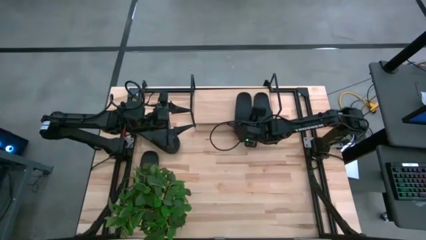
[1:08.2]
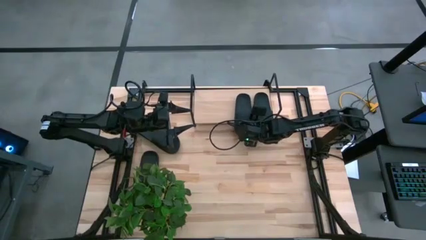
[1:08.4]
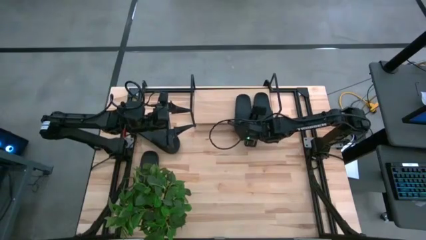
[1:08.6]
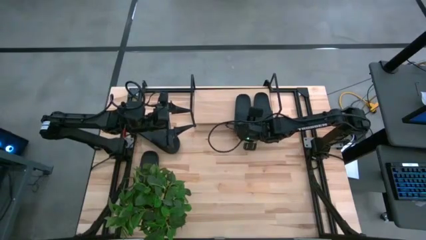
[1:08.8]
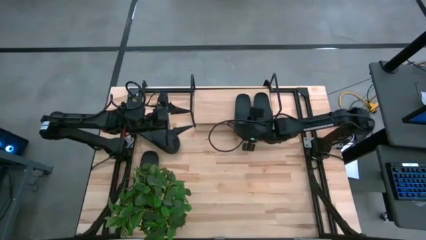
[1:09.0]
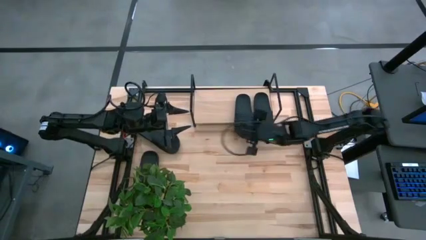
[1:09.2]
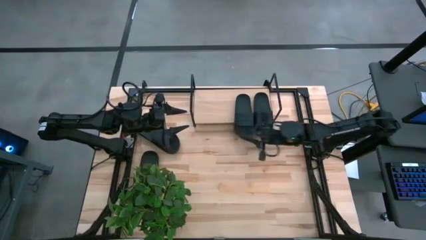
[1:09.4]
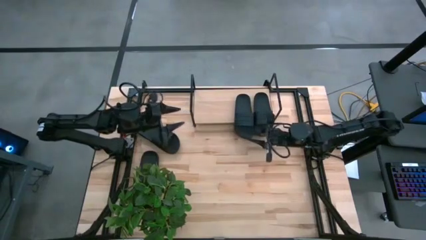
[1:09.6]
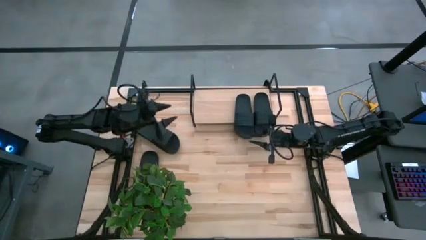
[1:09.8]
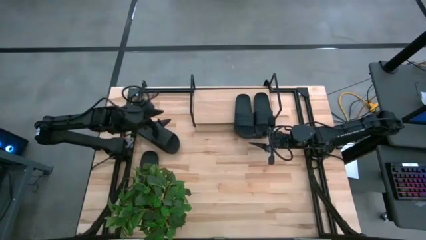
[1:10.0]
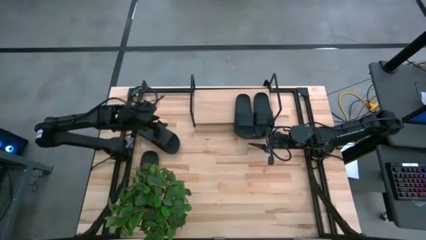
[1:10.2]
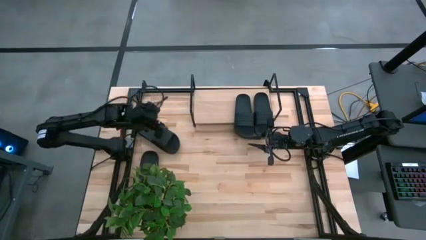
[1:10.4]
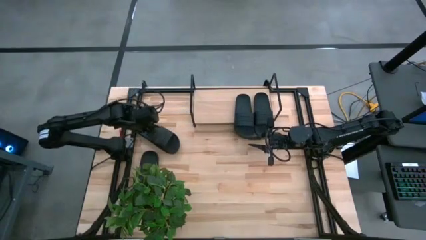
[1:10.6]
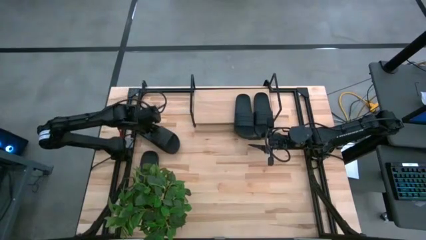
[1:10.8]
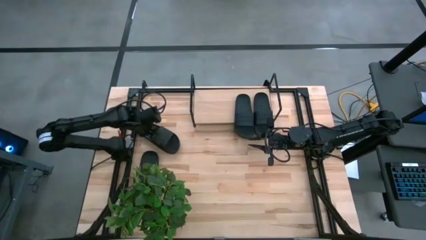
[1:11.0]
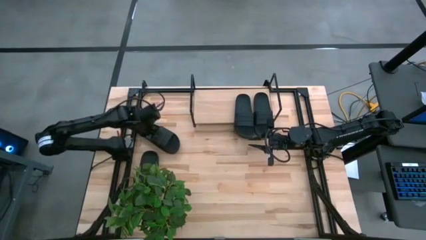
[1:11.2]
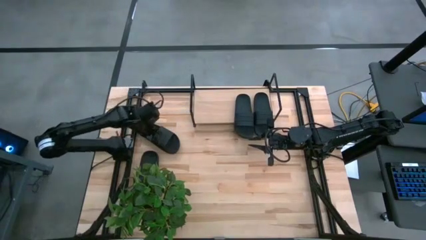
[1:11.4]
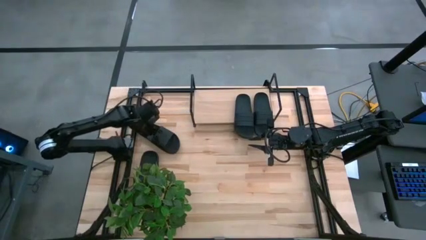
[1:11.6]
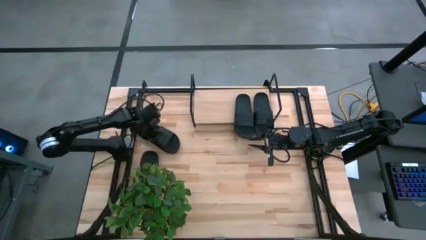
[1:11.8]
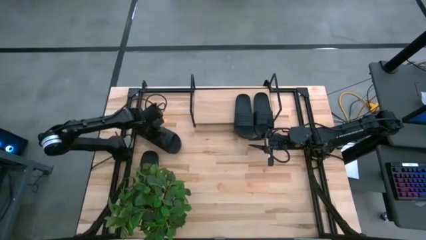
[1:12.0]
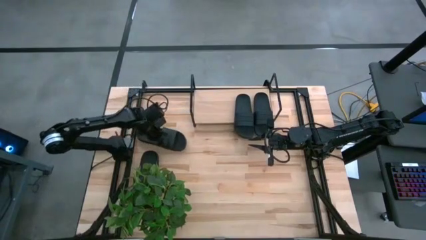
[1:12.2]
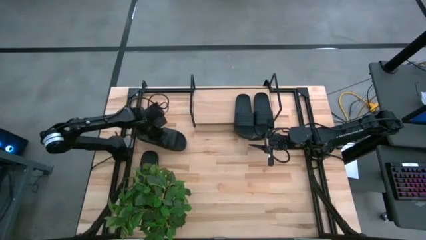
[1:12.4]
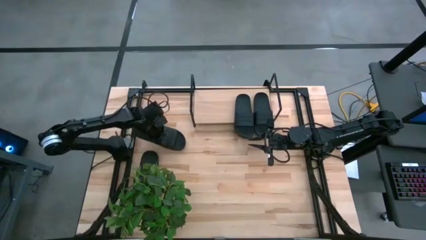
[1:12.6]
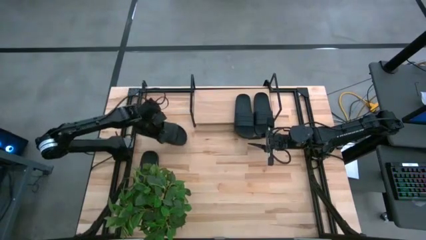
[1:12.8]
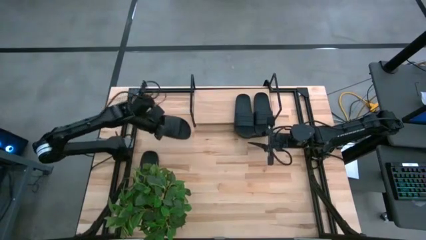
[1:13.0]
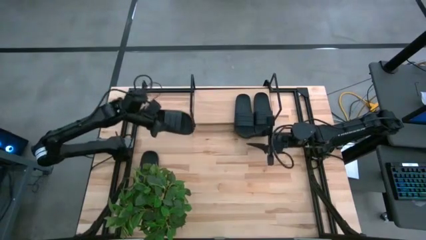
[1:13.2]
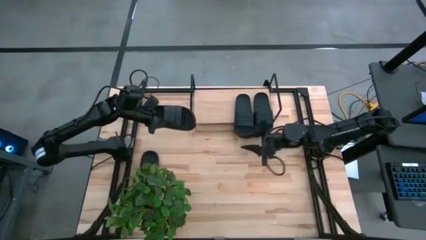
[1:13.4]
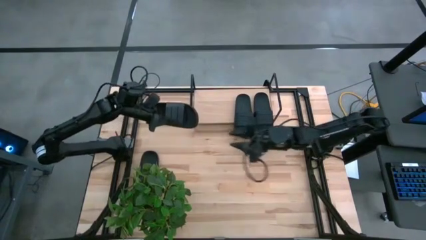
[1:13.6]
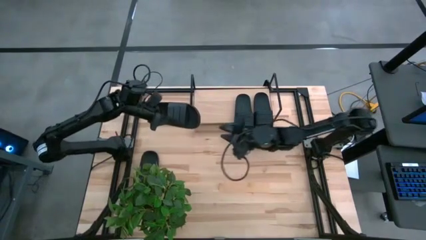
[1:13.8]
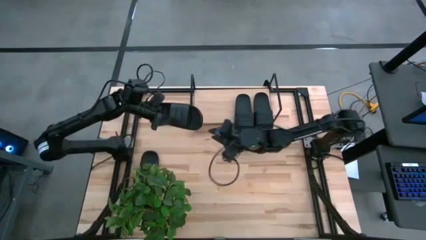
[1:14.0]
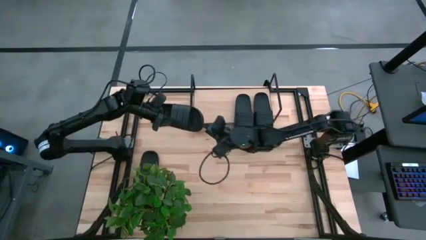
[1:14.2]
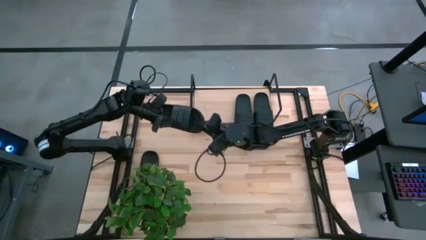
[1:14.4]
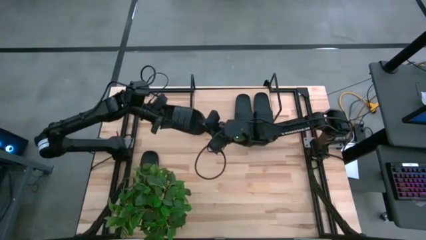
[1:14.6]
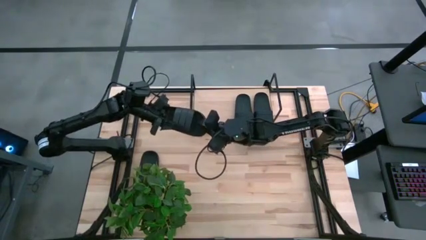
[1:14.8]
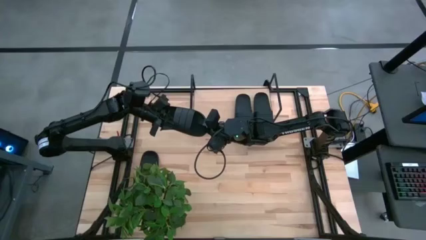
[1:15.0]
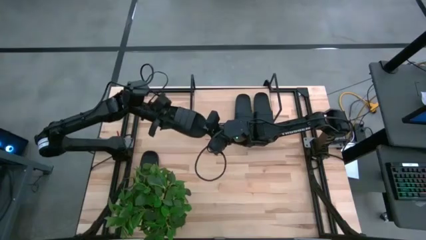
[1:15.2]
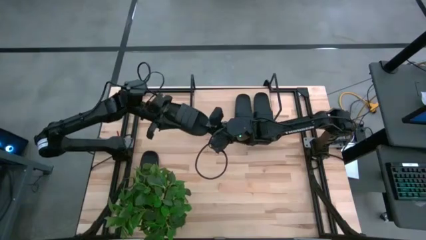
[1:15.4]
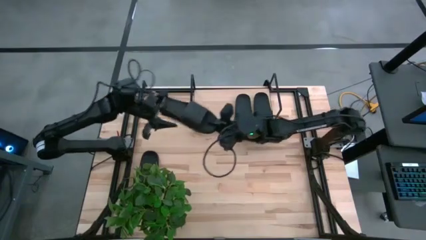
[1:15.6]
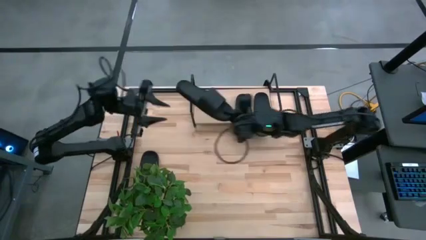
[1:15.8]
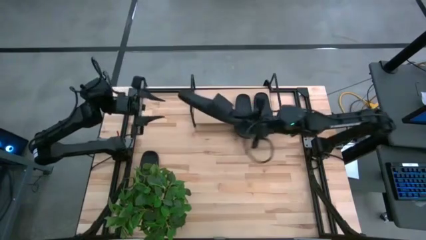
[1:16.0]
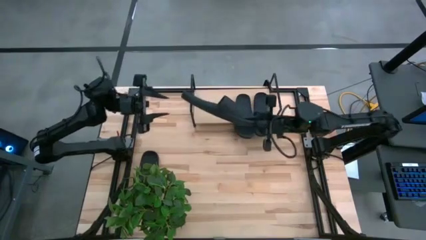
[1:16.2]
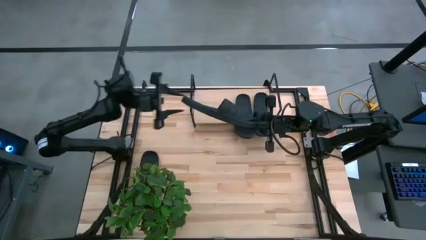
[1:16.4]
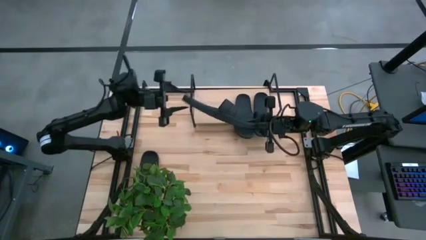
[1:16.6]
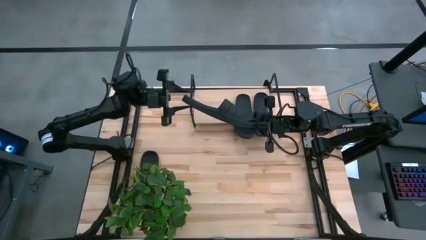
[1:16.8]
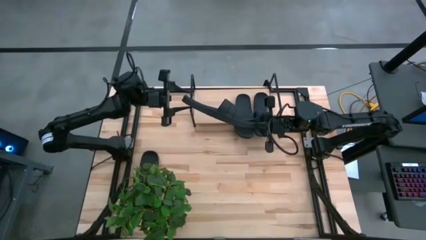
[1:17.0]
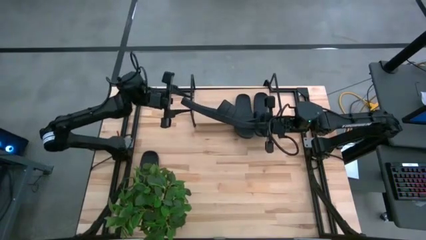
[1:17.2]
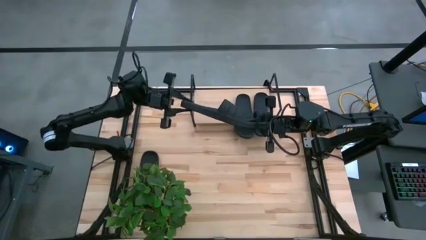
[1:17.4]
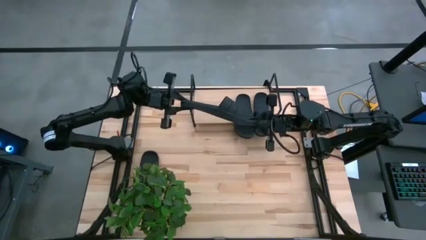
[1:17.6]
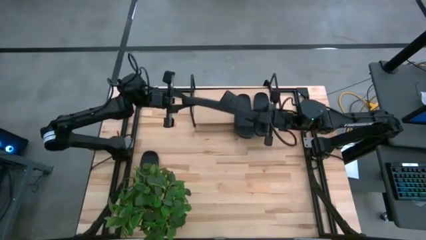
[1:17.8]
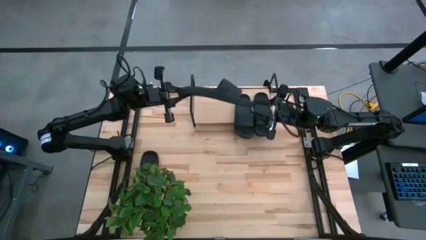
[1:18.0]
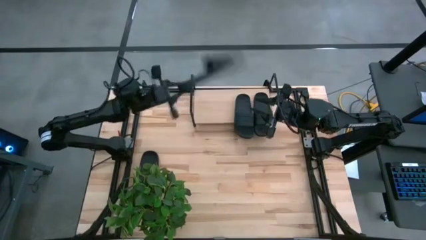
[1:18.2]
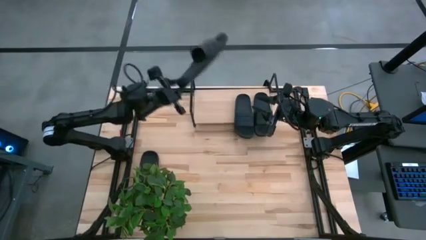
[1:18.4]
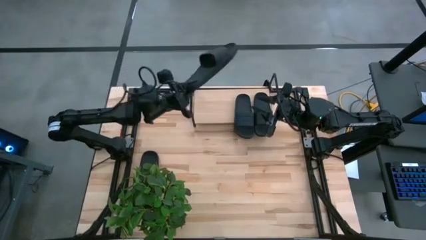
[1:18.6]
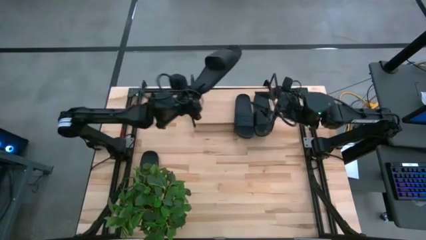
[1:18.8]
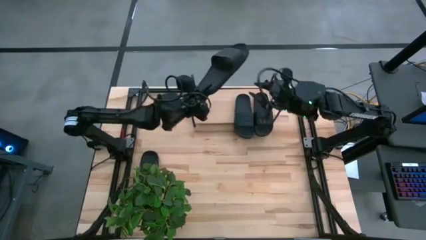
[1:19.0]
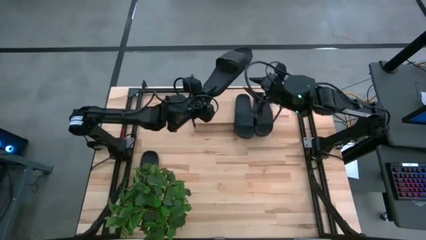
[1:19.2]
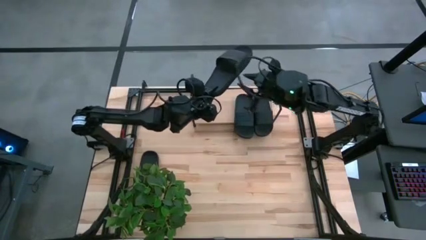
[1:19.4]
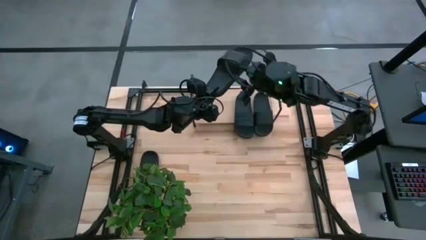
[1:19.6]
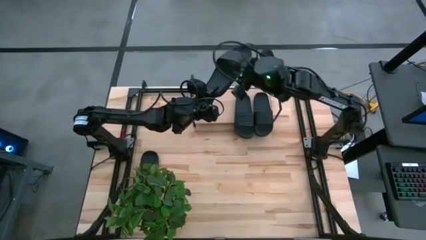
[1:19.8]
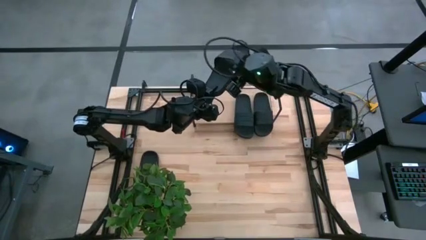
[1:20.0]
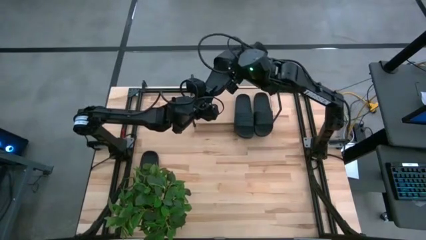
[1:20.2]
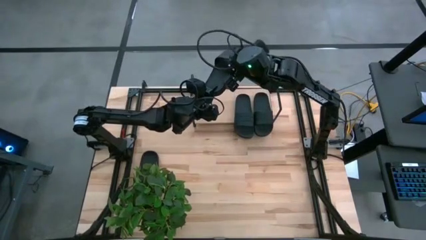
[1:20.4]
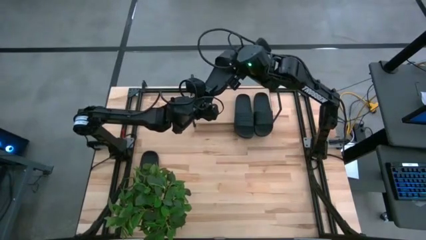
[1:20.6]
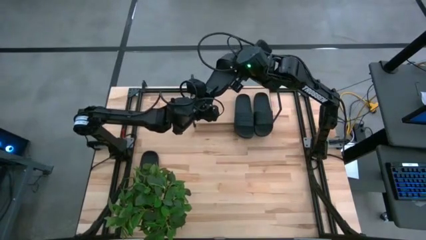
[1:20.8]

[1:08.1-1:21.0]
Task: Pick and place slides into the shelf
Put the black slipper on the shelf

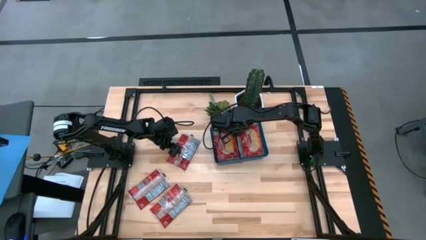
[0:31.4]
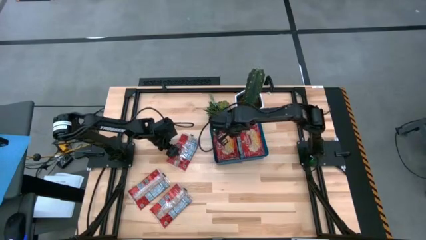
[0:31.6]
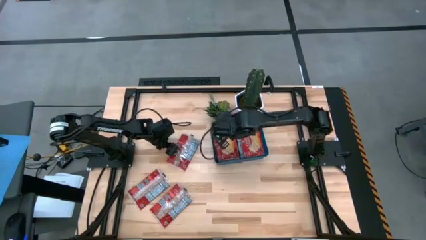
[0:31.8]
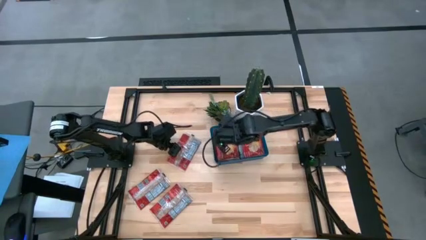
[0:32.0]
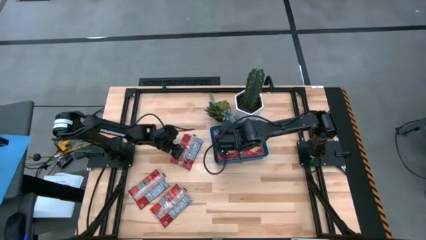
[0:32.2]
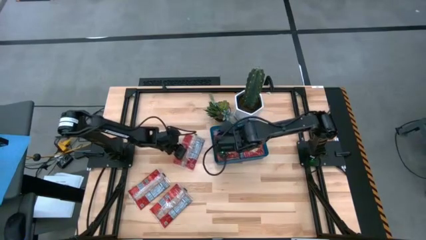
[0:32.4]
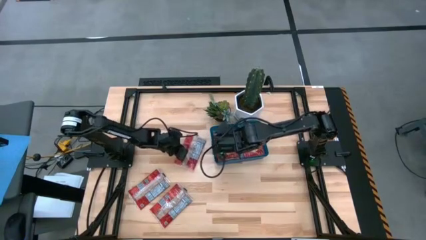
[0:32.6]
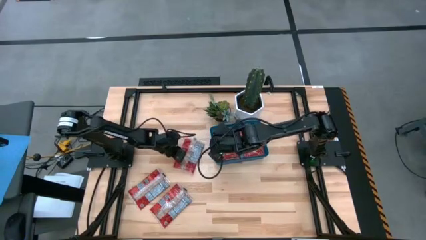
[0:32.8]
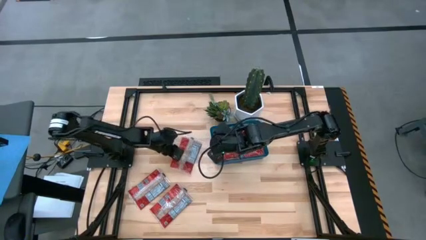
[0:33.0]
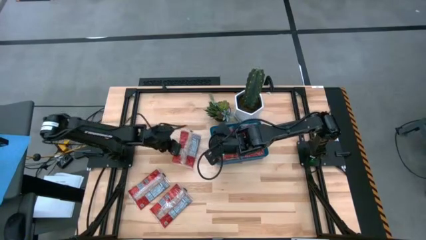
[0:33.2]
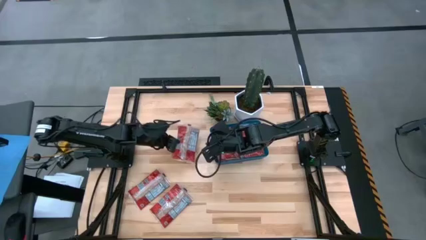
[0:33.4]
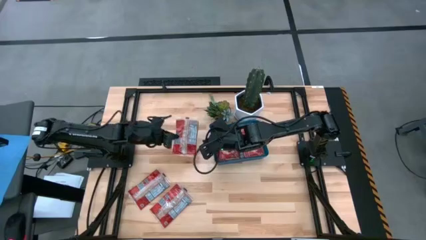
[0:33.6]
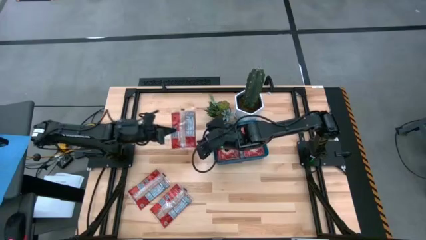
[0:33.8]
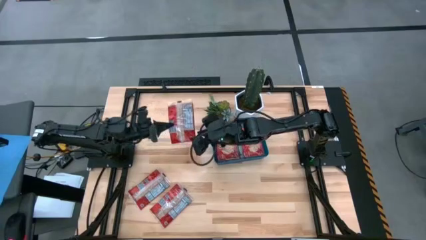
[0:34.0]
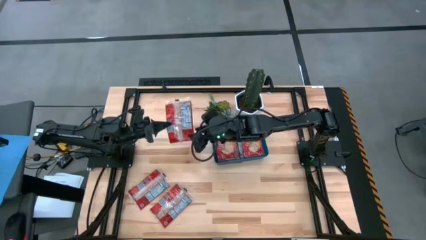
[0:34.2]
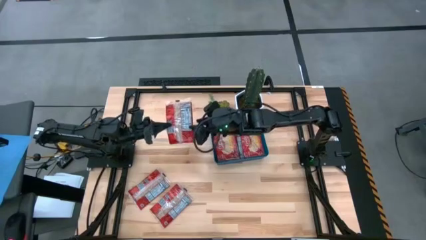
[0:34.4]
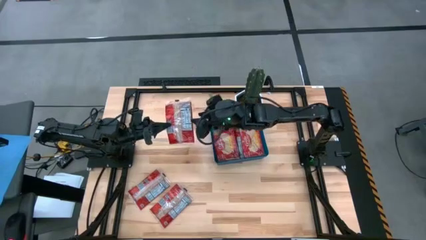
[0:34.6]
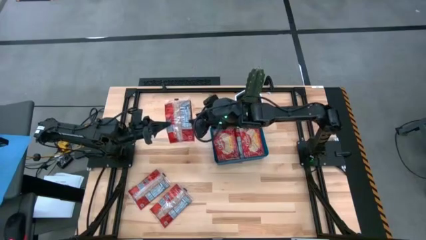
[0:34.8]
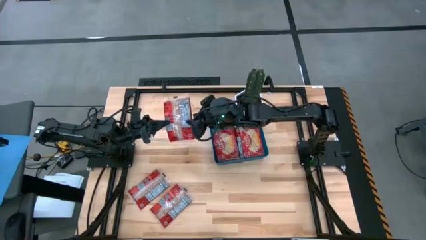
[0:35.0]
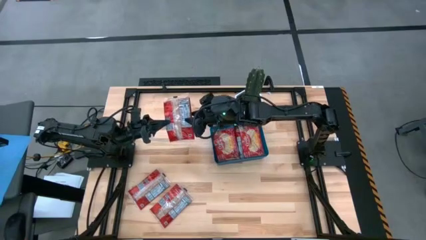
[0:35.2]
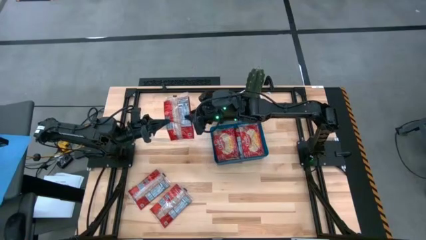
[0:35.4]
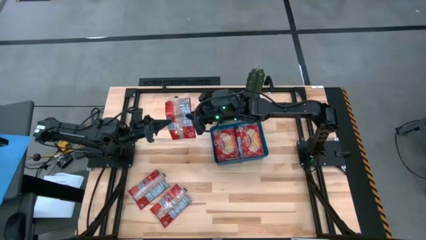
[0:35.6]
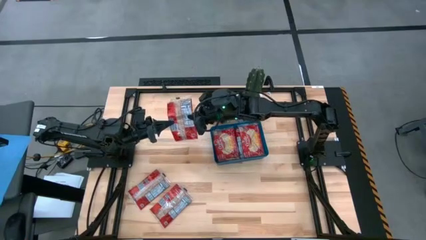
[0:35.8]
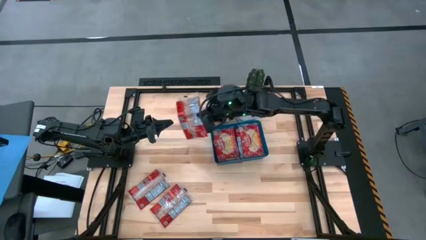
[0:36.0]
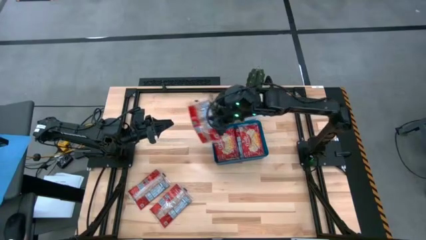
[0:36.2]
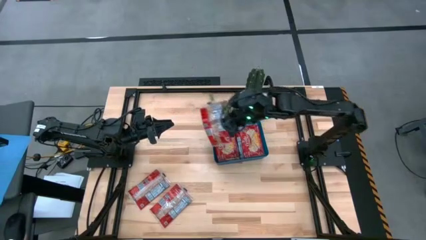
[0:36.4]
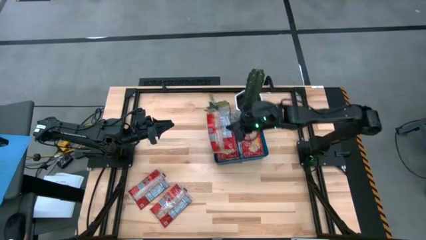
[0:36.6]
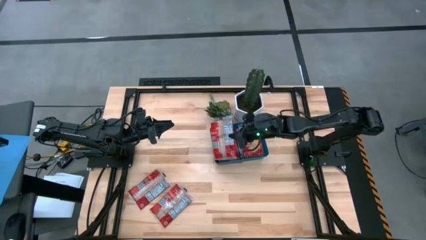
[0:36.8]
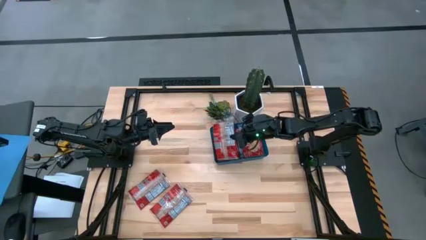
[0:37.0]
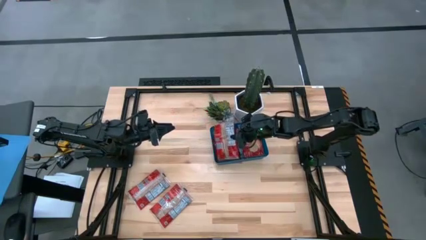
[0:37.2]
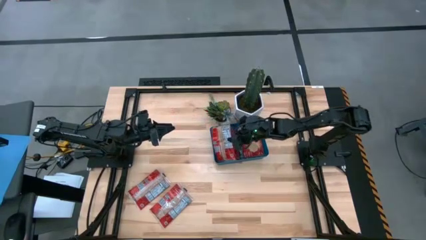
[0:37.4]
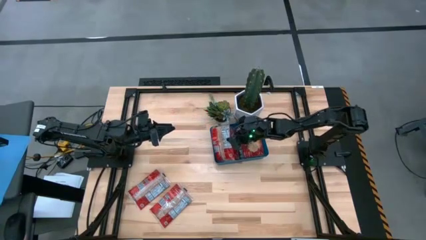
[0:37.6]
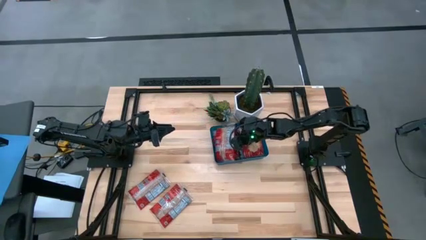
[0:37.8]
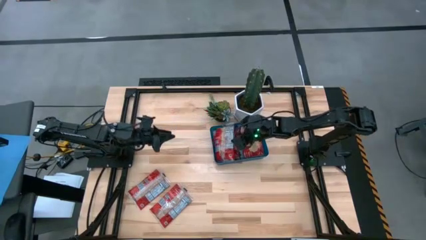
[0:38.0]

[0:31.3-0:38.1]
Task: Sort popcorn bags into baskets
Put the red popcorn bag into the blue container
